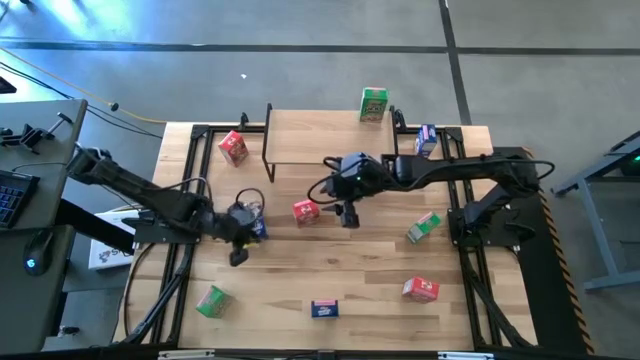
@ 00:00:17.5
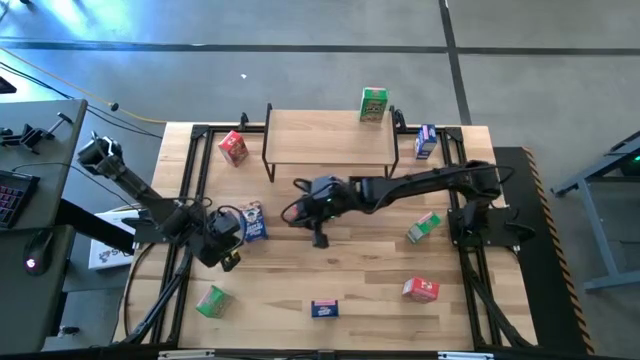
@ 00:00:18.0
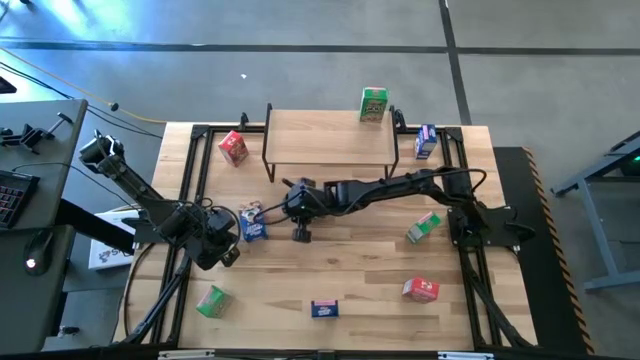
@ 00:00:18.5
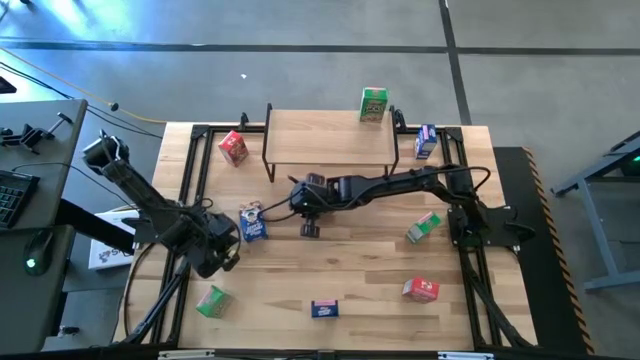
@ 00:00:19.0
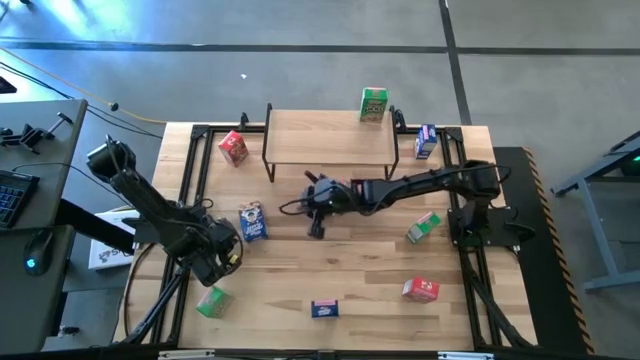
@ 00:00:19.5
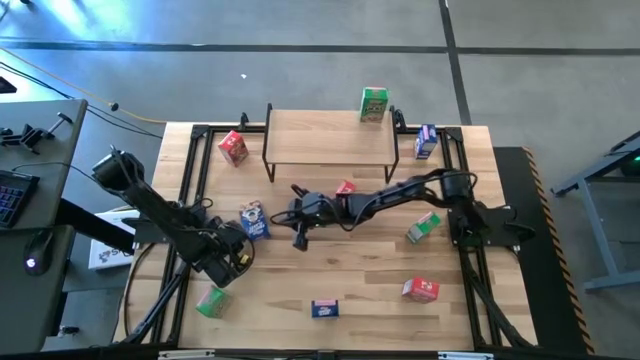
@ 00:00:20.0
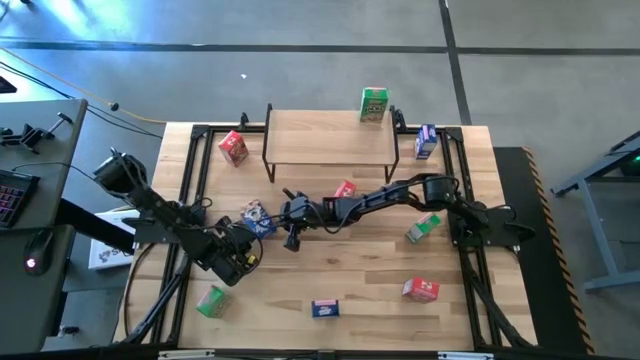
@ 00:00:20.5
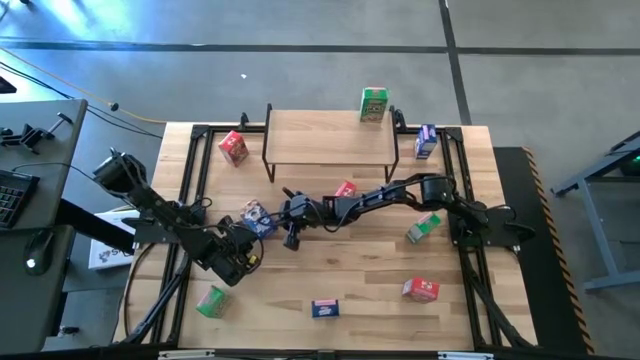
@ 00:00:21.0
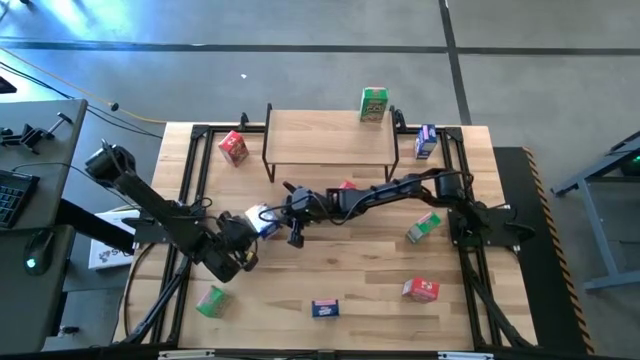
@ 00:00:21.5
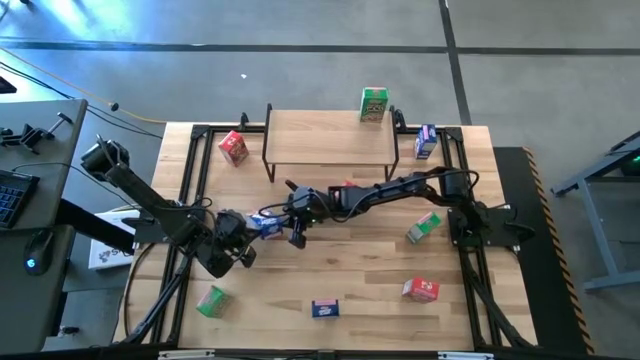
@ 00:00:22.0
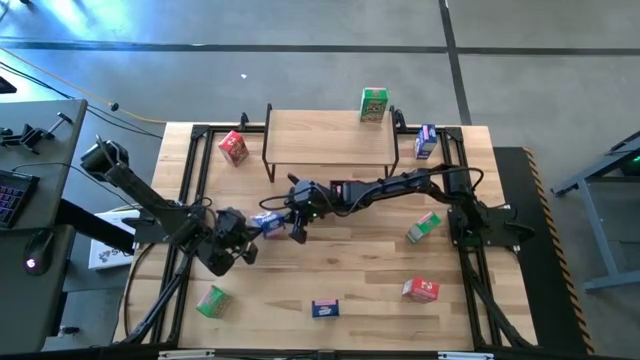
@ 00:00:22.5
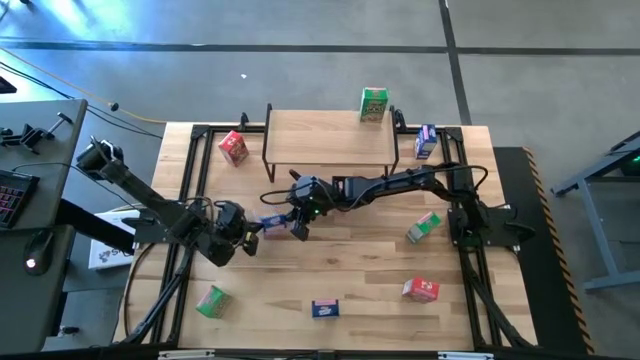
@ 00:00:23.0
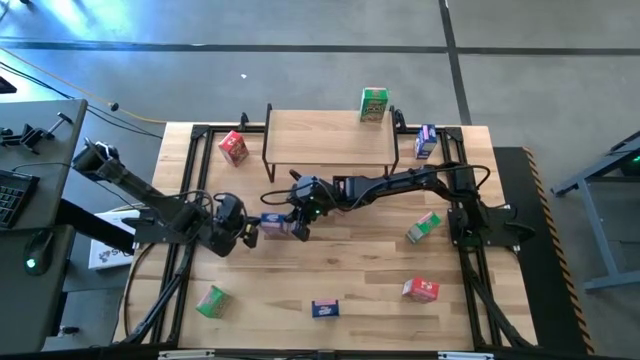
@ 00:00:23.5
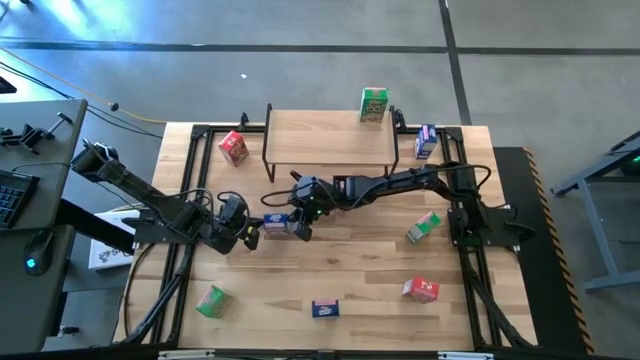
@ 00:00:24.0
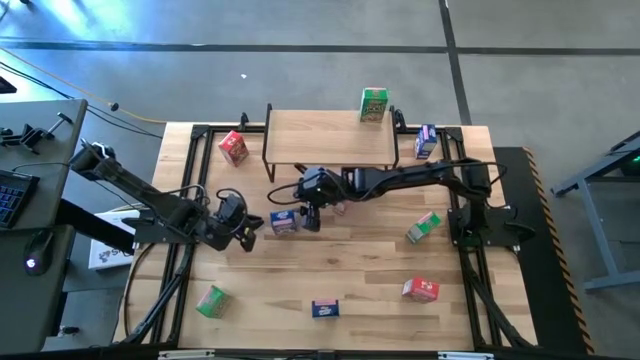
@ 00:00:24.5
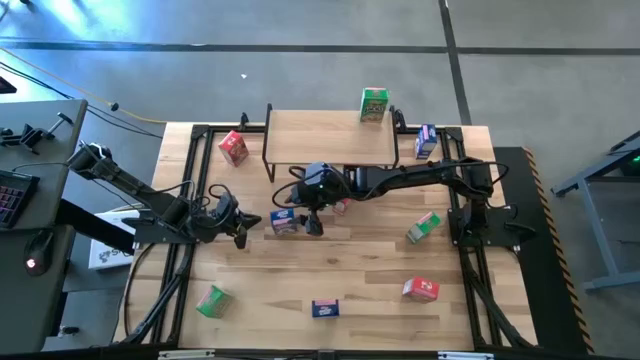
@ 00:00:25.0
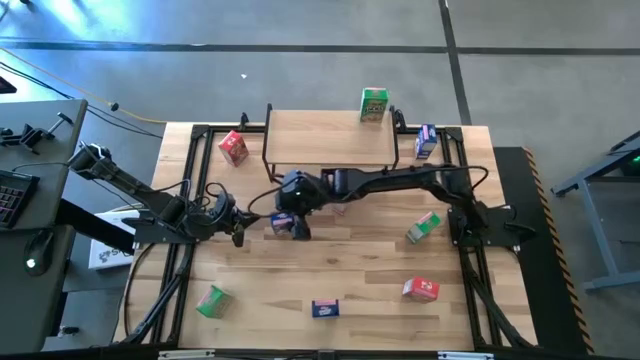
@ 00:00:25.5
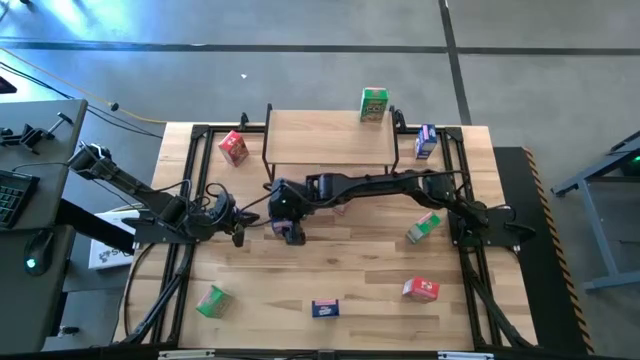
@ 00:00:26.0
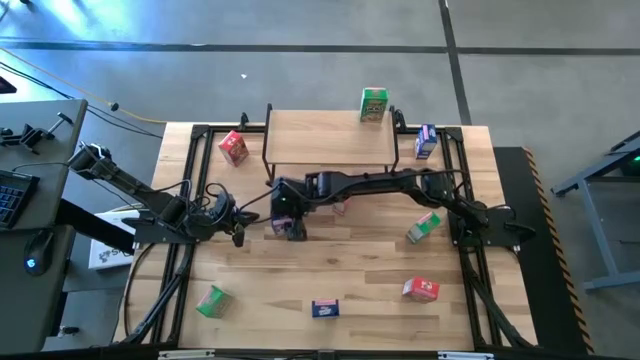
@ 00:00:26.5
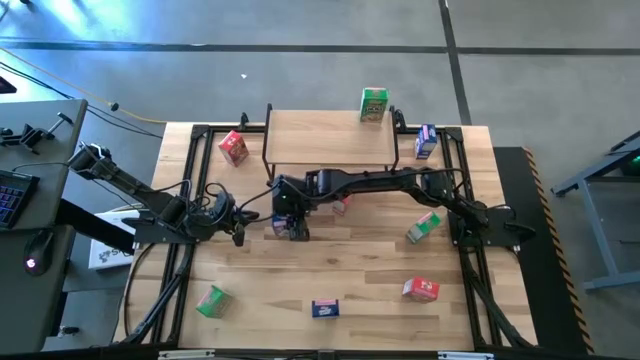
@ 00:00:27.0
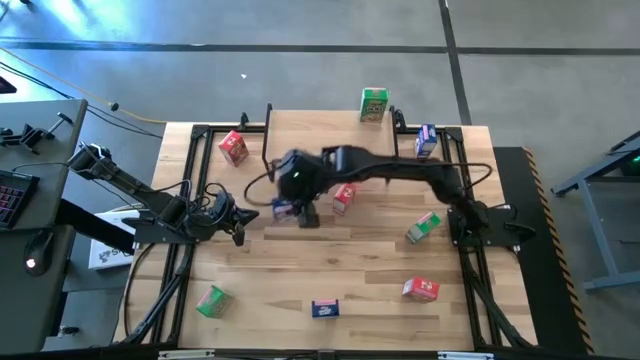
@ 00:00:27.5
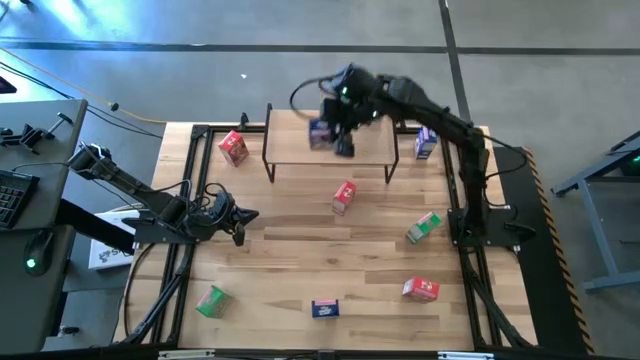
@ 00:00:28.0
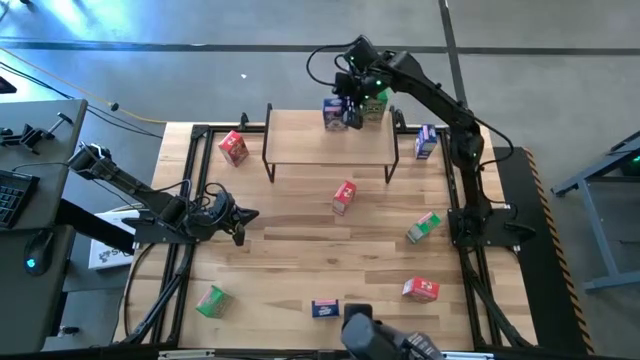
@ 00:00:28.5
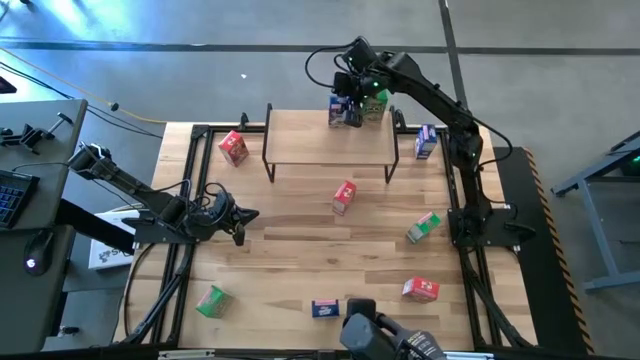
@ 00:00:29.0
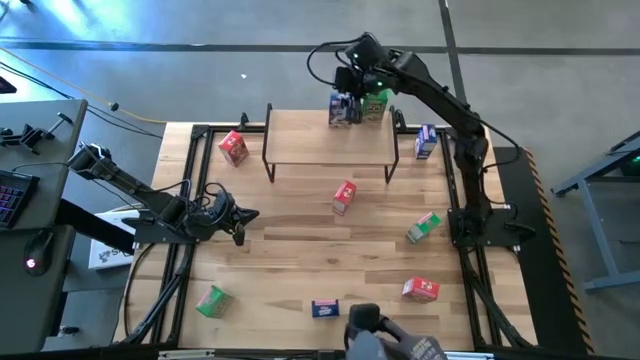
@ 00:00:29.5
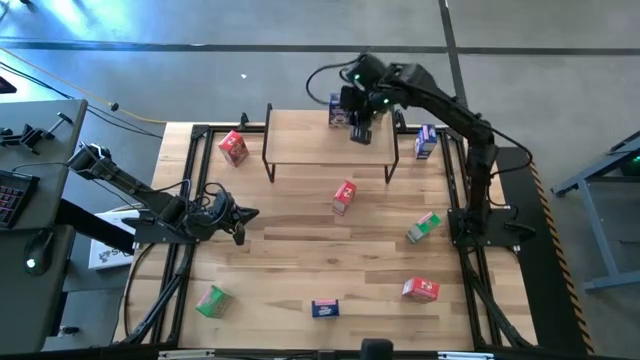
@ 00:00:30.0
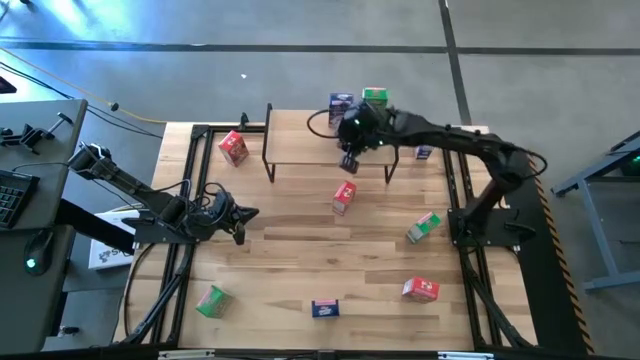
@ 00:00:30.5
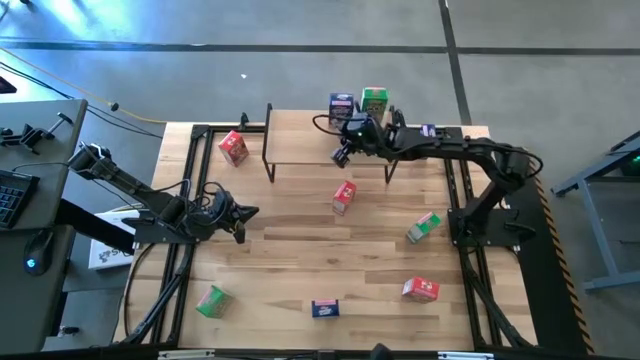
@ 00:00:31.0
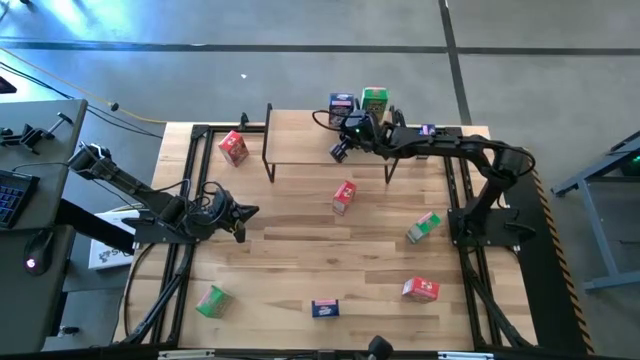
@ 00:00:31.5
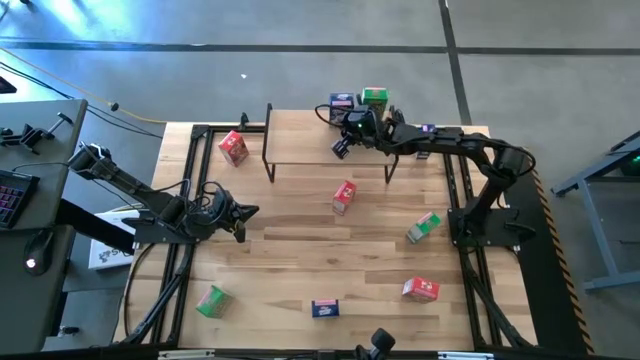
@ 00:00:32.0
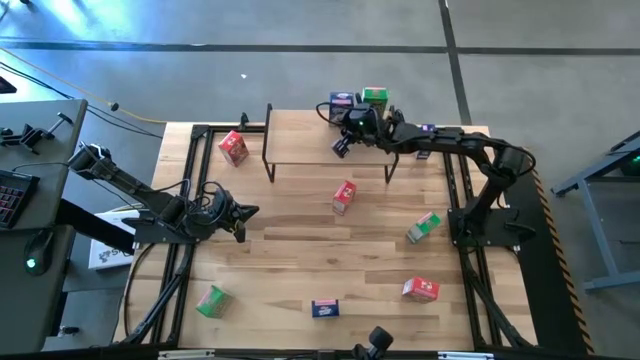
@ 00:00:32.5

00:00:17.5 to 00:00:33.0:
Task: Stack cereal on shelf
Put the middle blue cereal box on the shelf

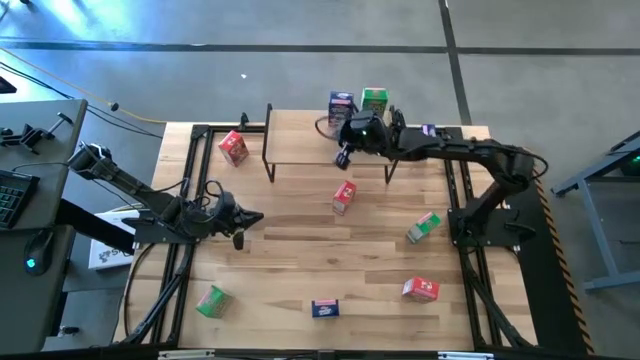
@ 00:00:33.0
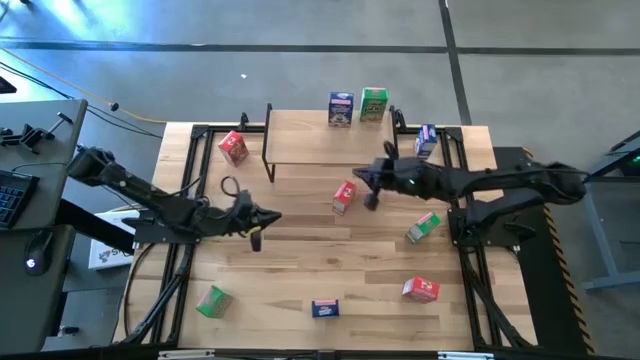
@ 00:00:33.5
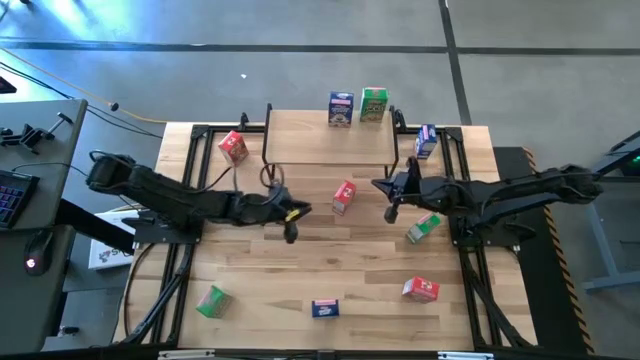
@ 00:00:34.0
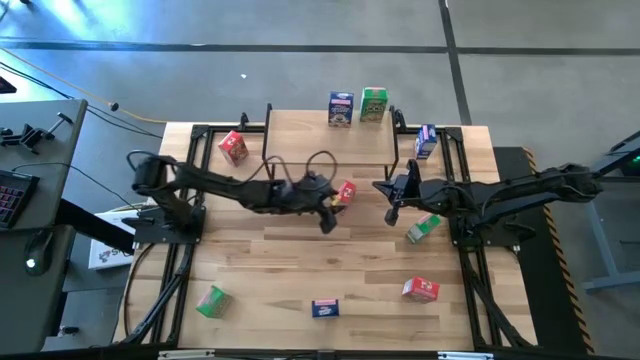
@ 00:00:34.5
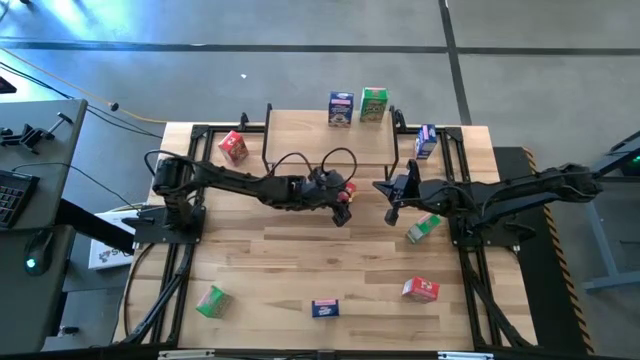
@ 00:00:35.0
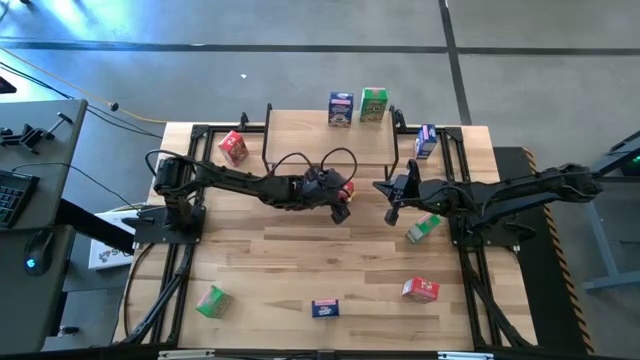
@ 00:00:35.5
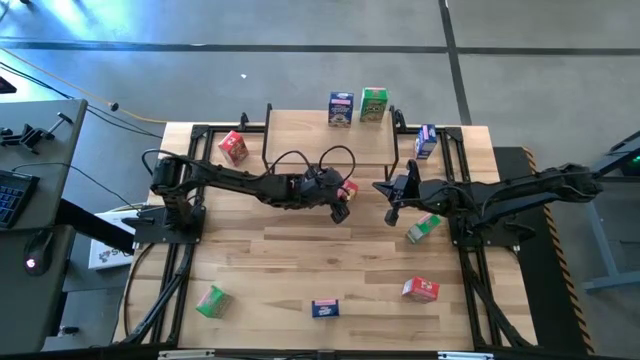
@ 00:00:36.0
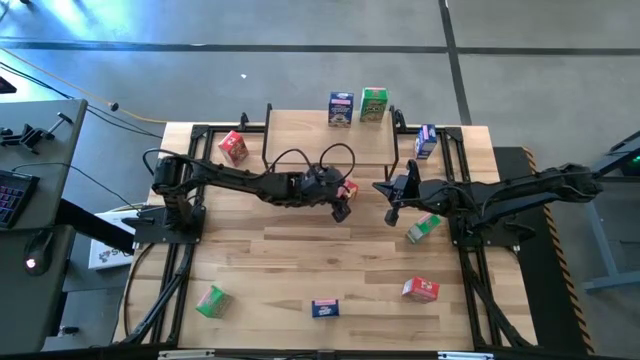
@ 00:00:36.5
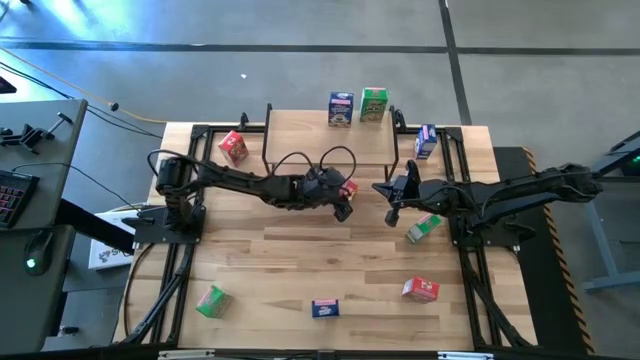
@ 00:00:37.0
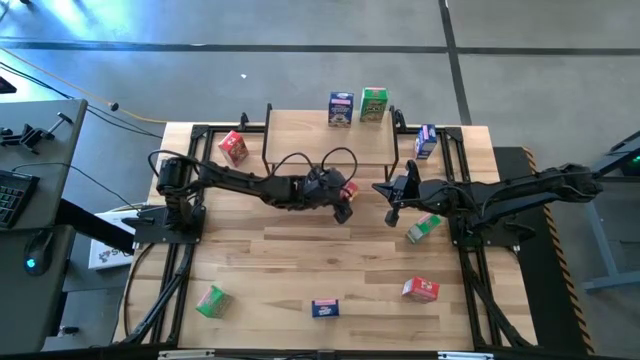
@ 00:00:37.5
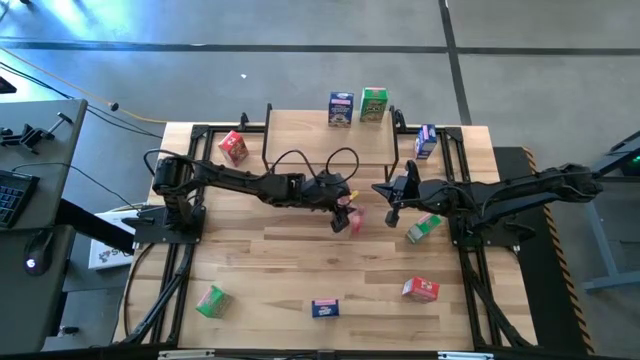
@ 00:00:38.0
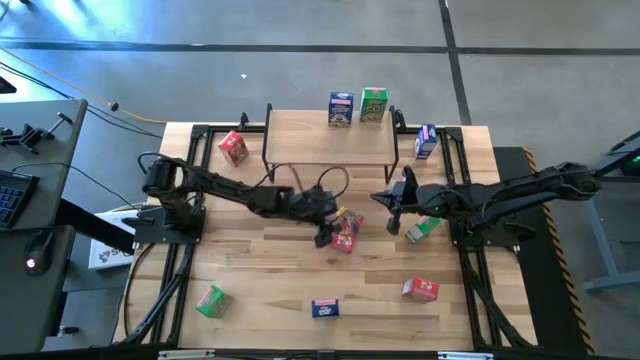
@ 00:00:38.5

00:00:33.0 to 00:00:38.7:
Put the middle red cereal box on the shelf
